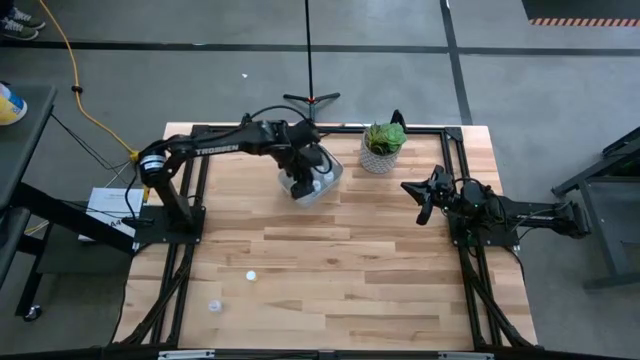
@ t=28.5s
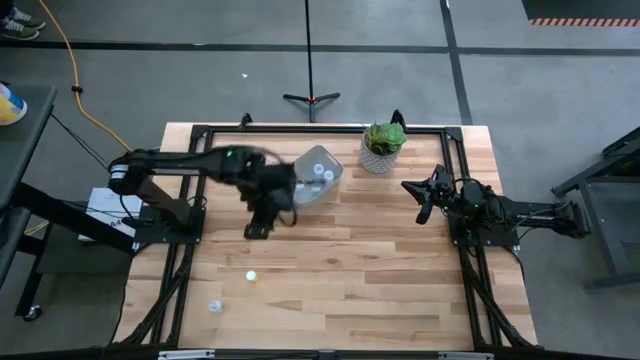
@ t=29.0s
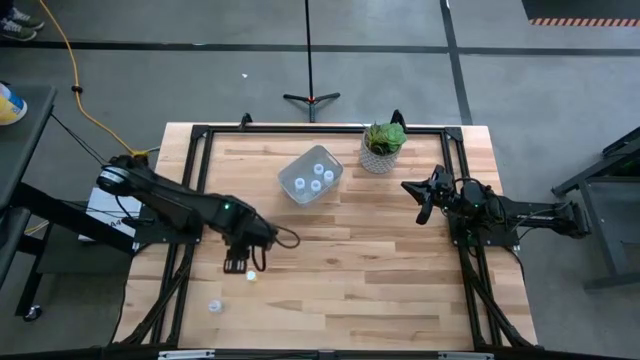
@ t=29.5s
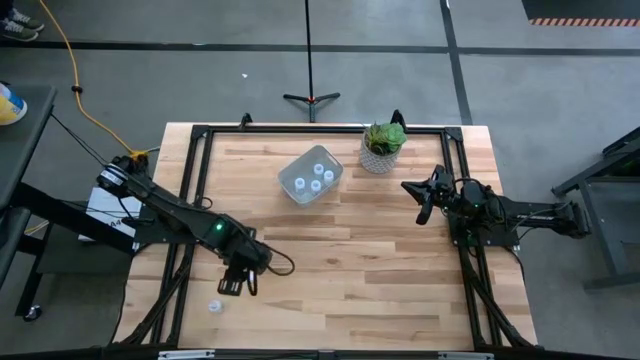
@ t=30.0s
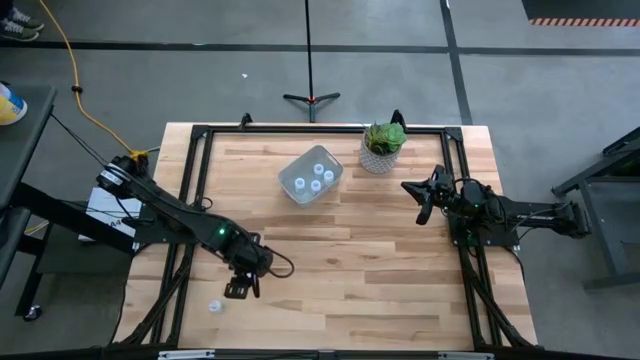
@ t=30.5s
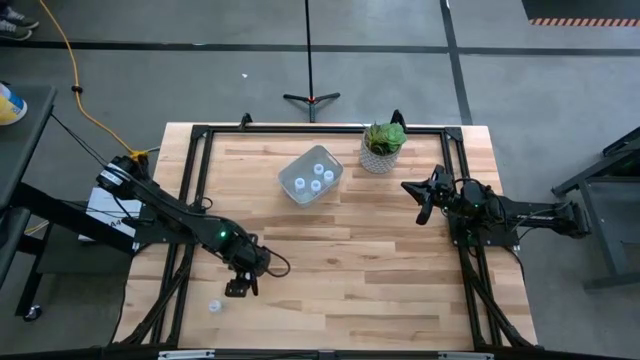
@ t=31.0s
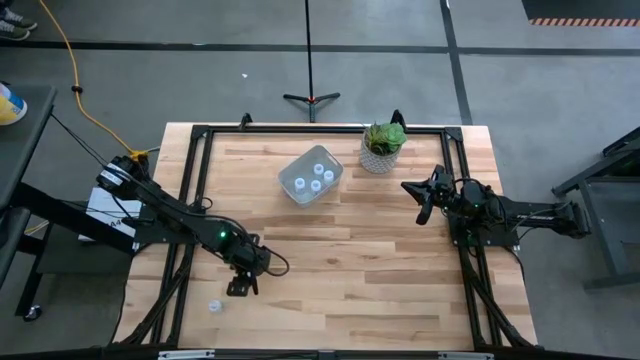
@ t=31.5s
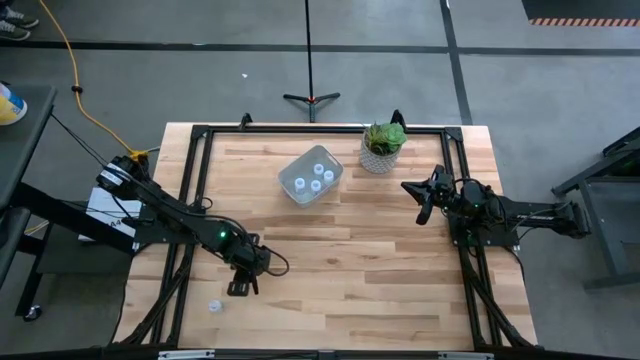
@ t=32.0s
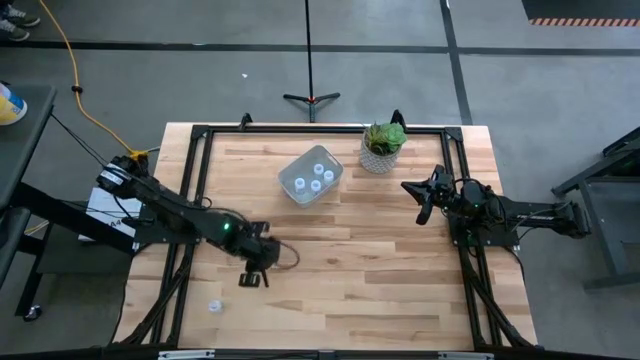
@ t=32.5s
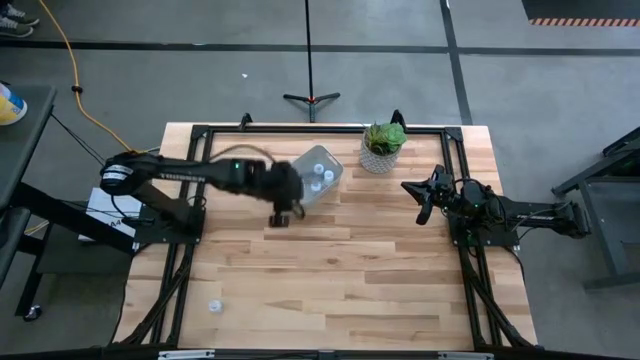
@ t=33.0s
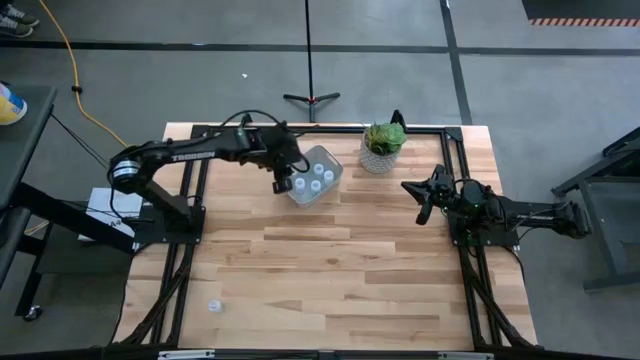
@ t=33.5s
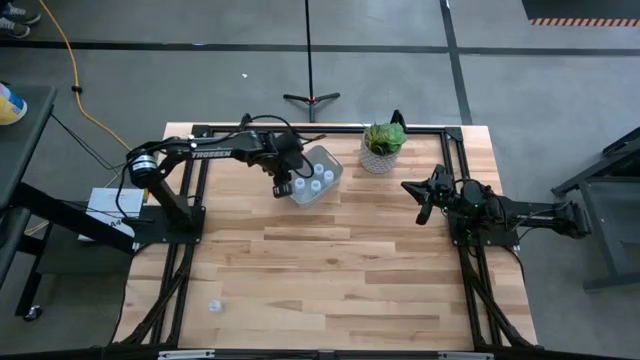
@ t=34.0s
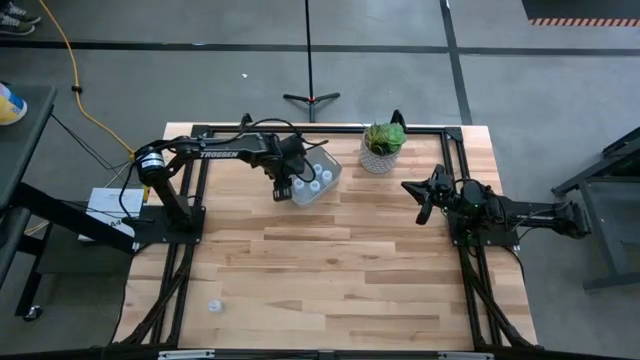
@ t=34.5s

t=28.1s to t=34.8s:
Task: Pick and place pill bottles into a basket
Put the yellow medicine bottle into the gray bin

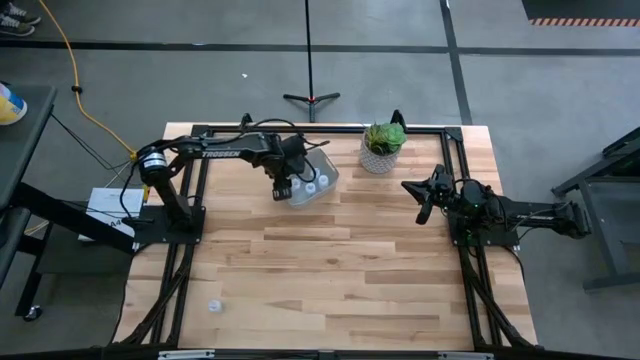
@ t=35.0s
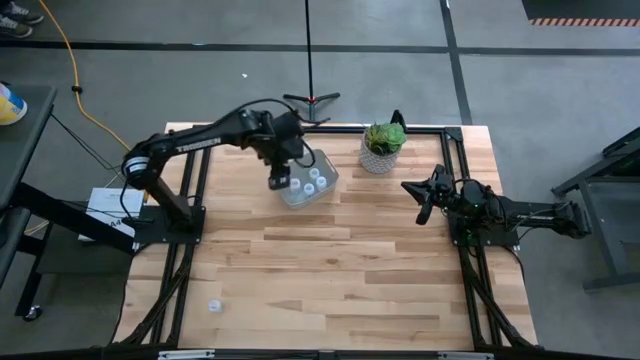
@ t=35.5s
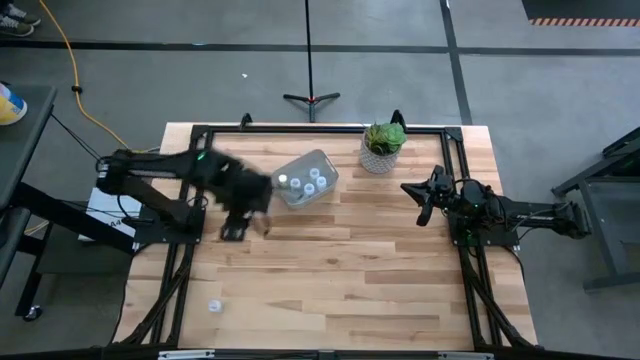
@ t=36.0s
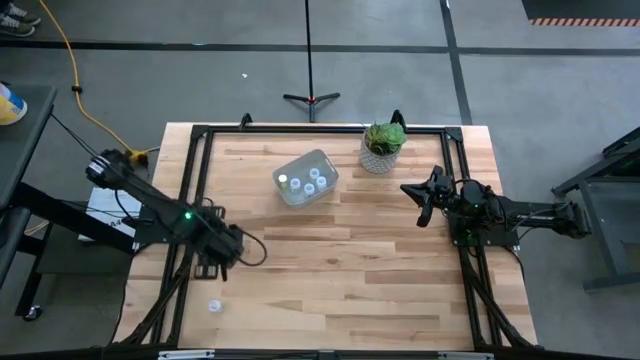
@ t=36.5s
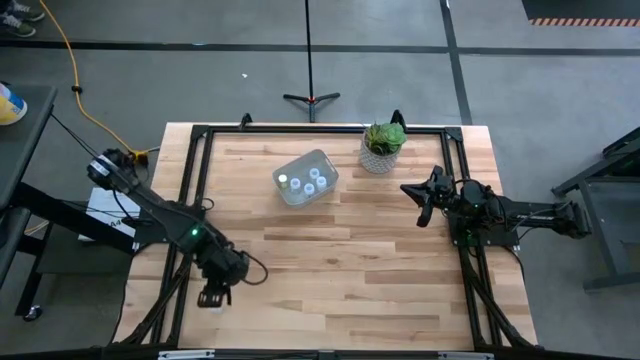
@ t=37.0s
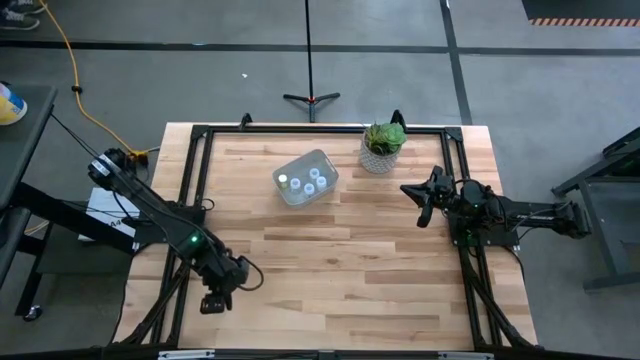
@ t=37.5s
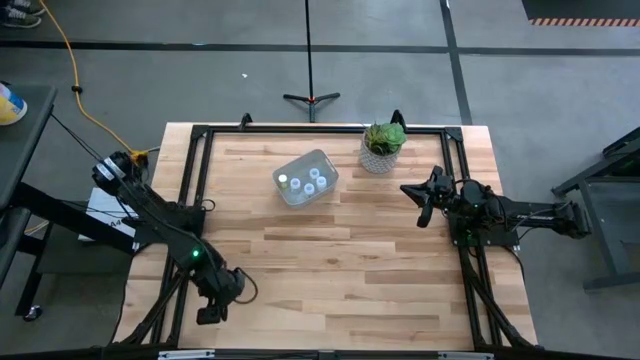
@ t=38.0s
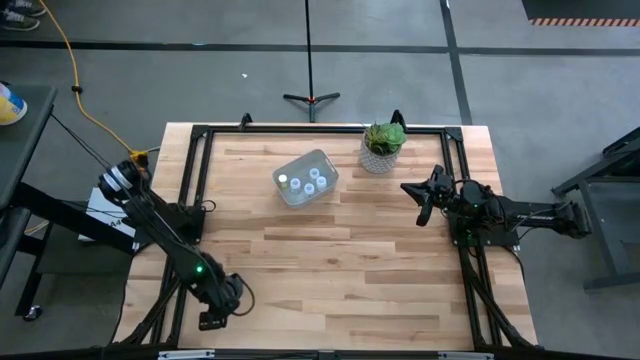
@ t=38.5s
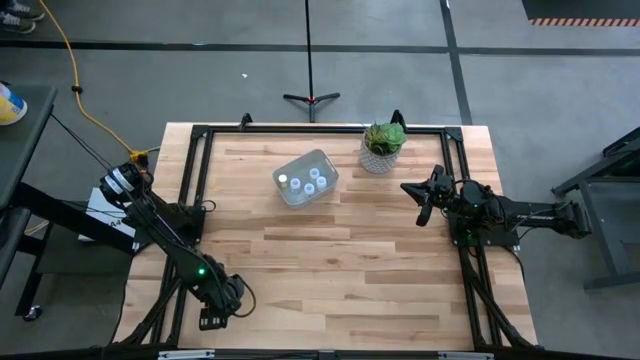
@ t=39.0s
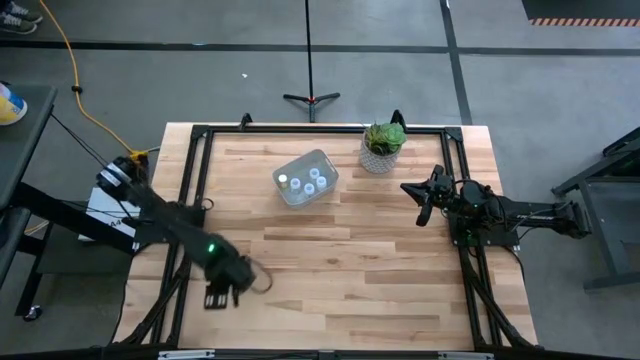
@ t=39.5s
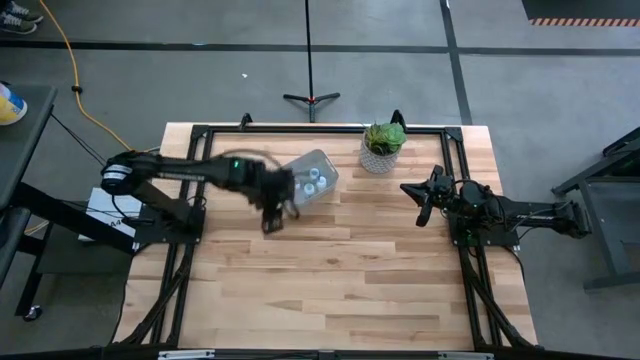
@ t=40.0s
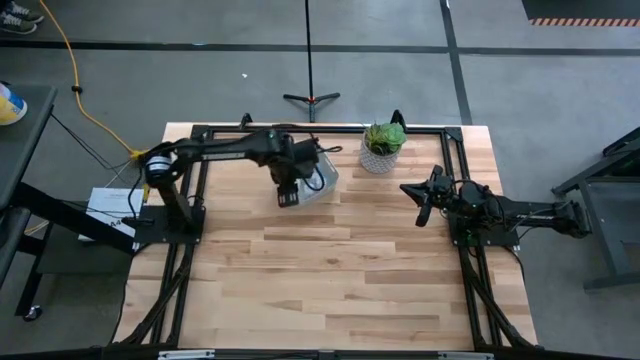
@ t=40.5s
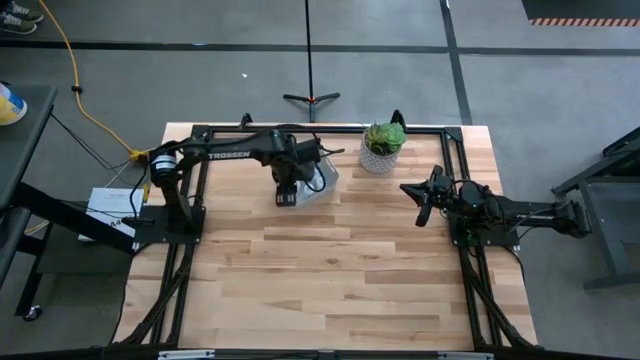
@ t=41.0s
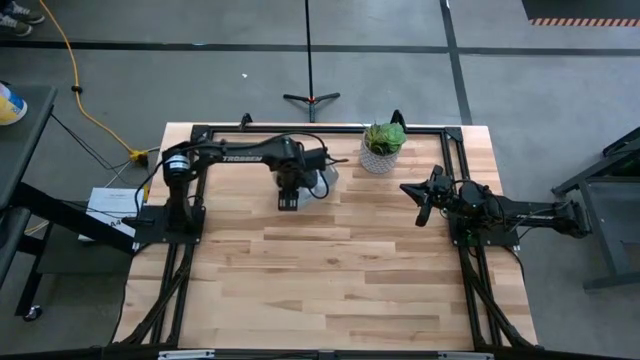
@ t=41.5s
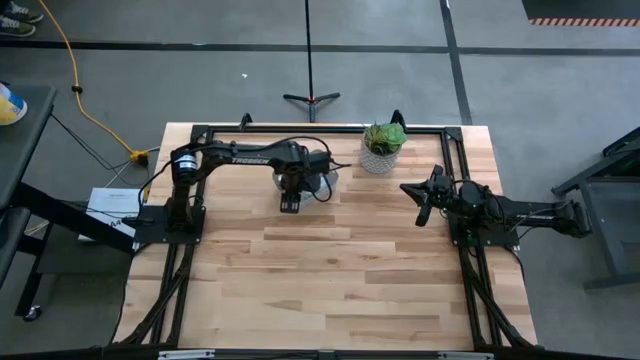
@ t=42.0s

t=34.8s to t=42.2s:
Put the transparent medicine bottle into the gray bin

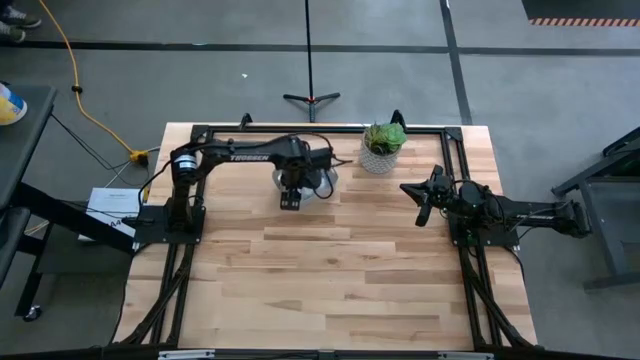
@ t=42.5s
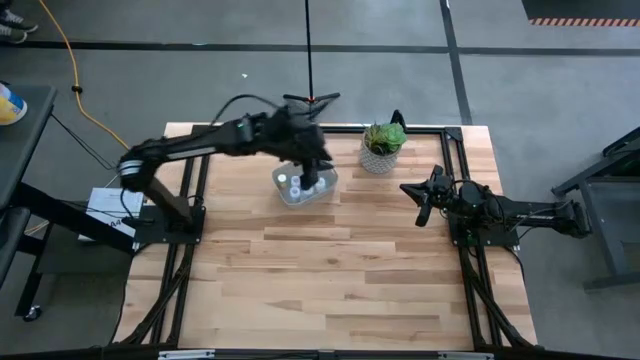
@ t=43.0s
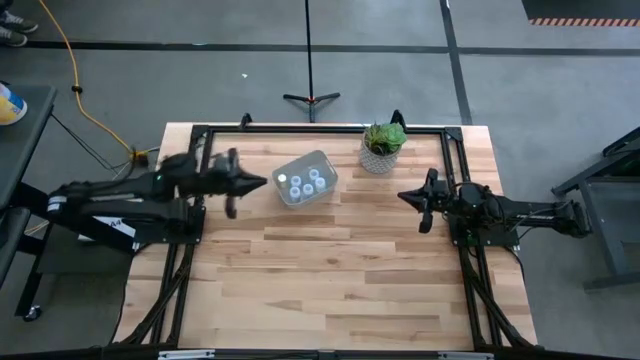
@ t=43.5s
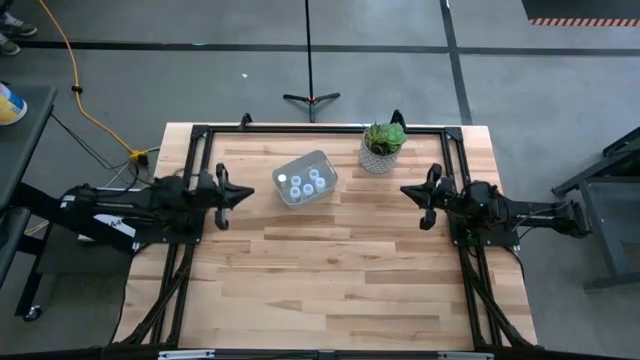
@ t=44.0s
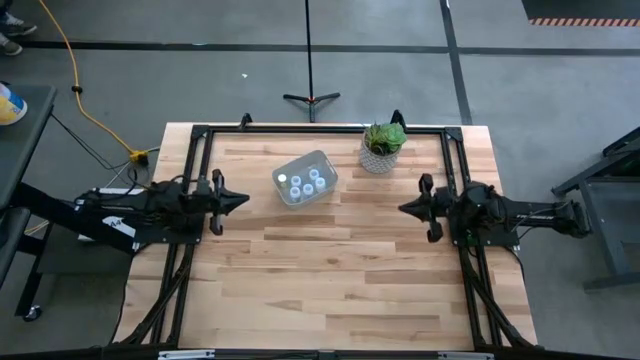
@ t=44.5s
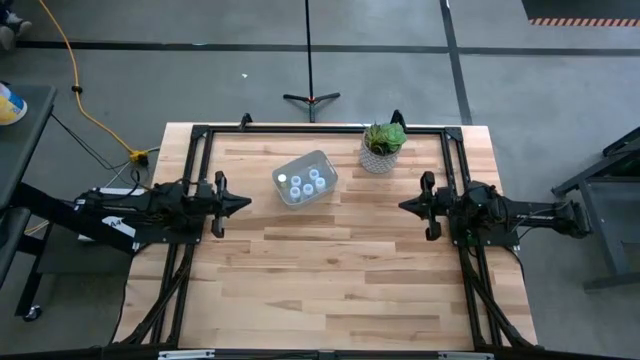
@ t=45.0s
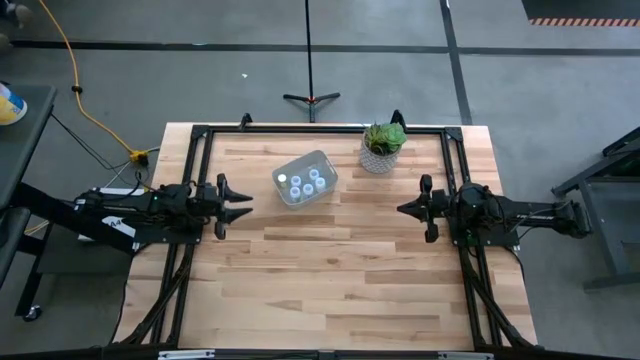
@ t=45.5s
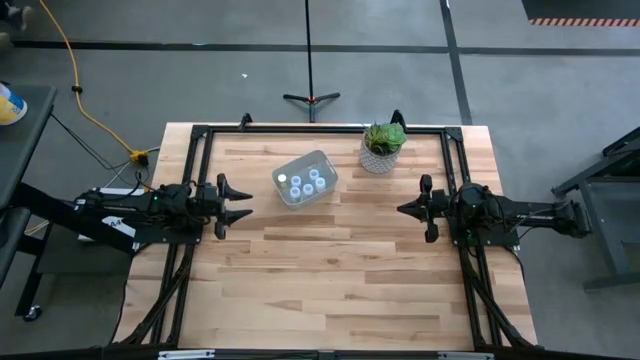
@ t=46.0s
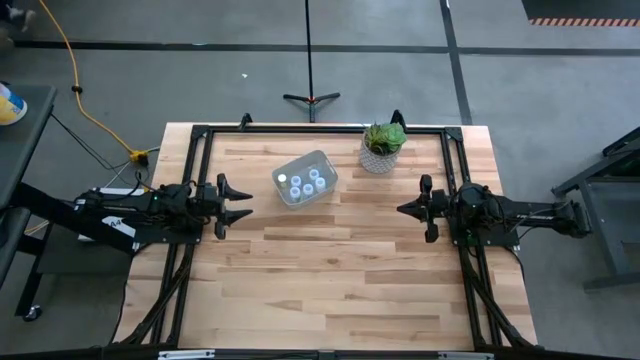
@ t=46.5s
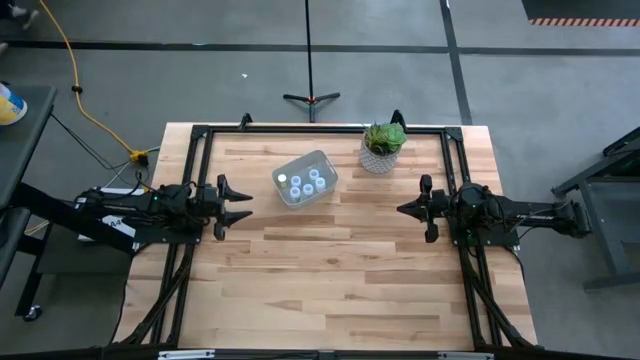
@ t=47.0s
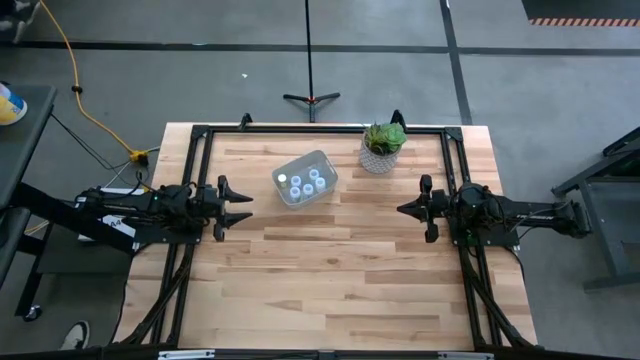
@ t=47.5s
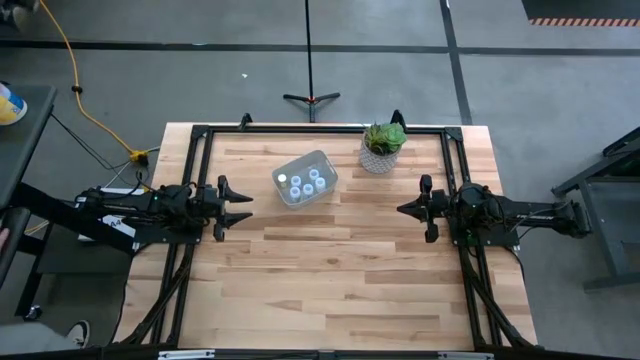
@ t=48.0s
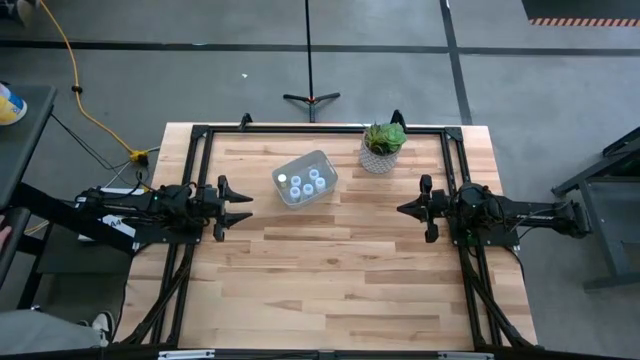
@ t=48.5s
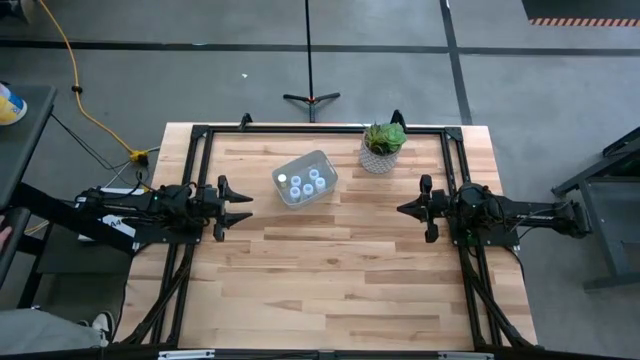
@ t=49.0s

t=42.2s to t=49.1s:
Return to Home Position

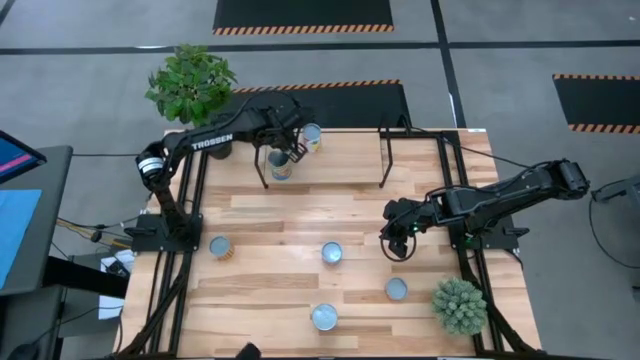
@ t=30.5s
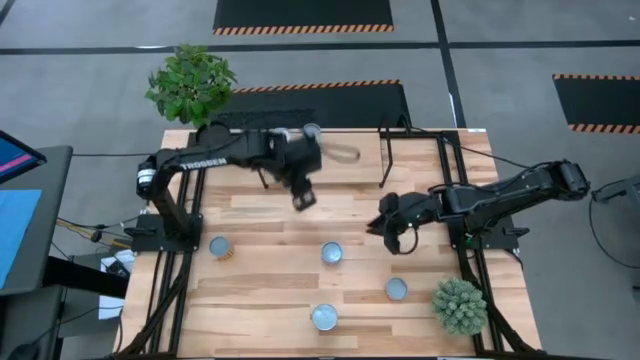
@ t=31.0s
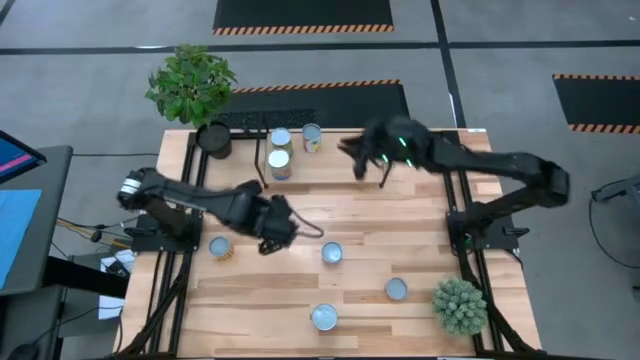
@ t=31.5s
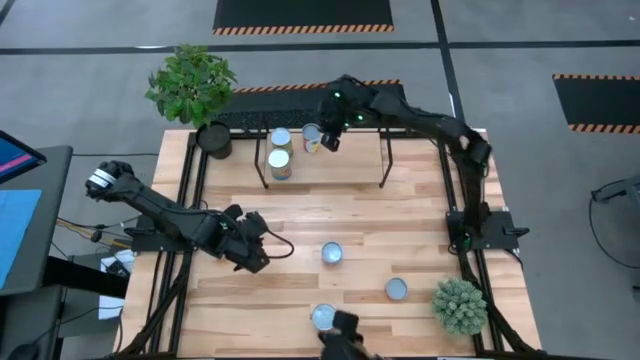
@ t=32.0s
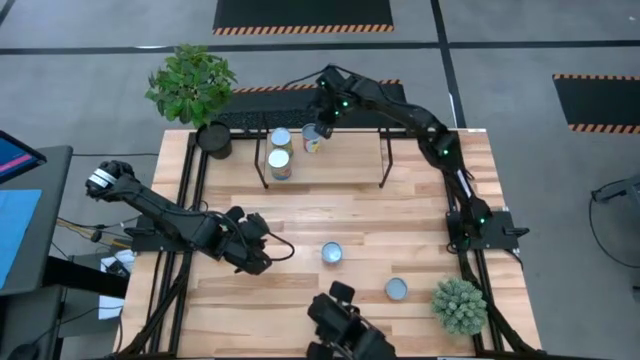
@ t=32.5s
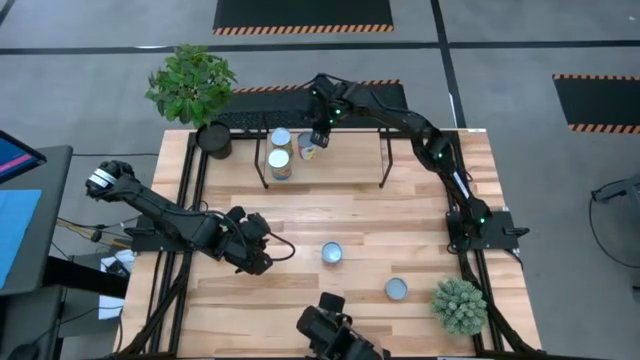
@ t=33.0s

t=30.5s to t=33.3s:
Task: Pick and place cans onto a shelf
Adjust the canned pineapple on the shelf
